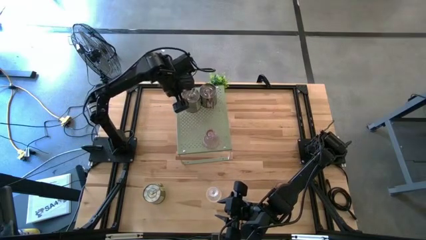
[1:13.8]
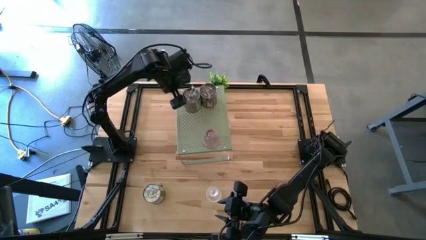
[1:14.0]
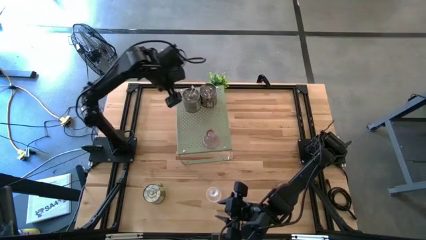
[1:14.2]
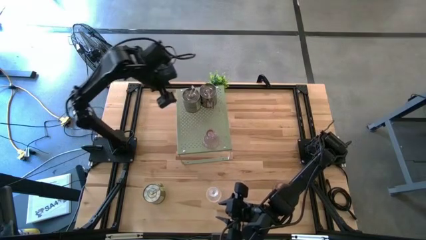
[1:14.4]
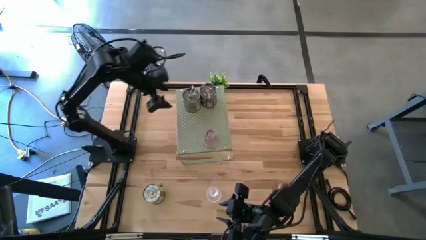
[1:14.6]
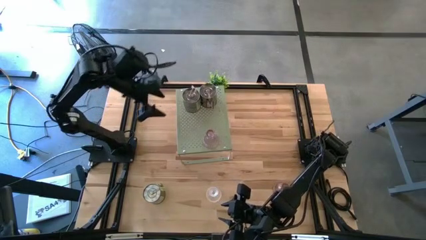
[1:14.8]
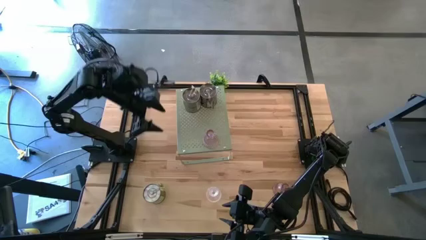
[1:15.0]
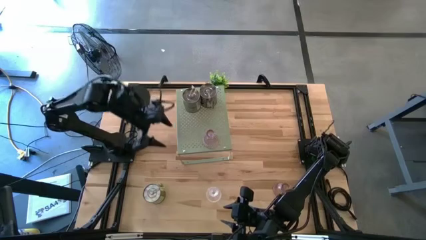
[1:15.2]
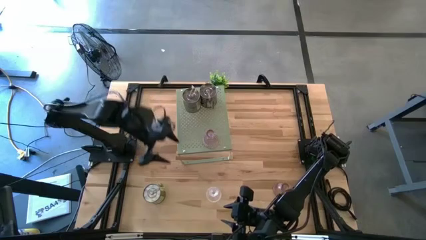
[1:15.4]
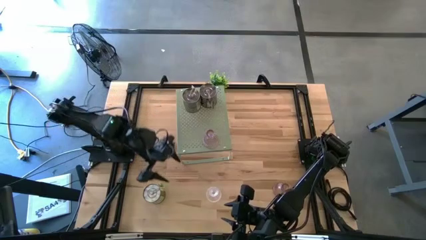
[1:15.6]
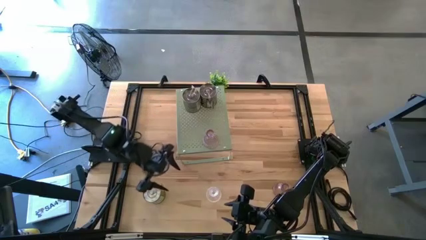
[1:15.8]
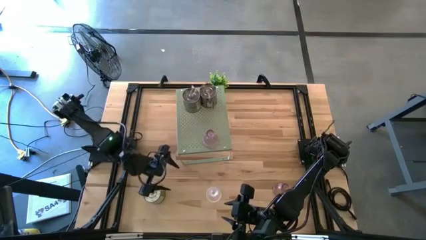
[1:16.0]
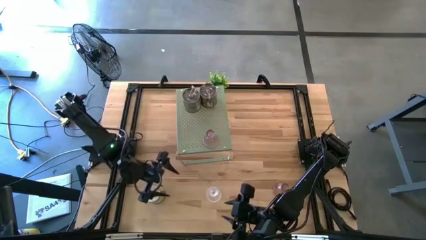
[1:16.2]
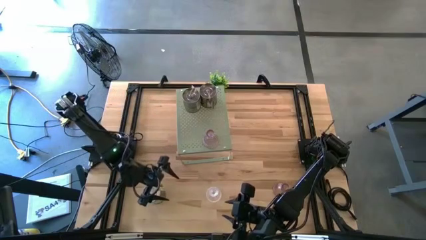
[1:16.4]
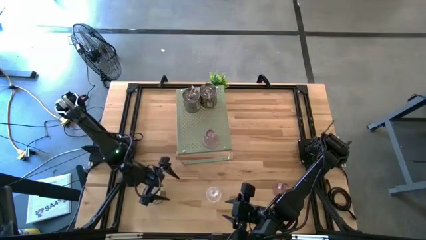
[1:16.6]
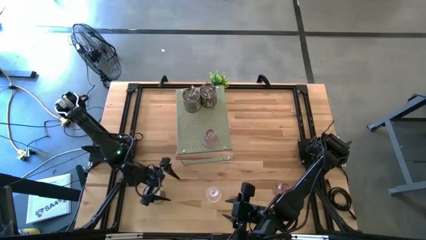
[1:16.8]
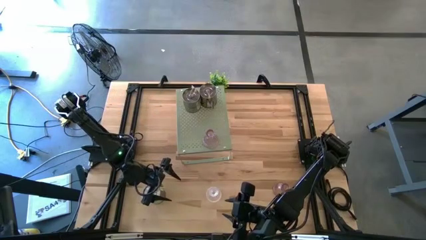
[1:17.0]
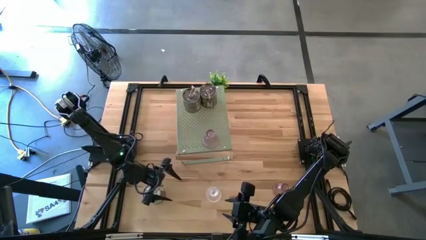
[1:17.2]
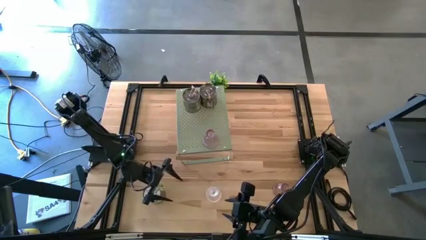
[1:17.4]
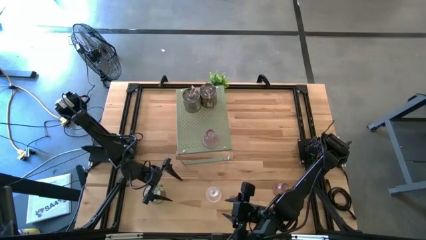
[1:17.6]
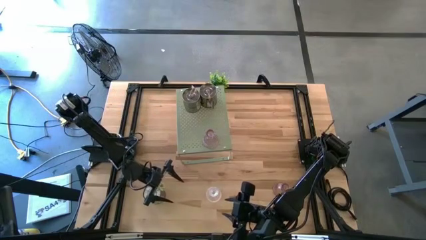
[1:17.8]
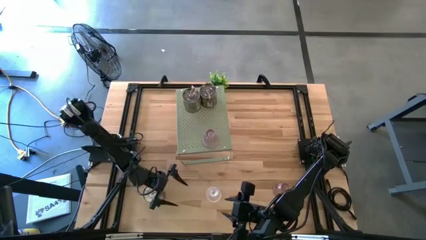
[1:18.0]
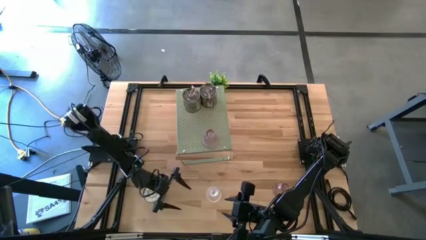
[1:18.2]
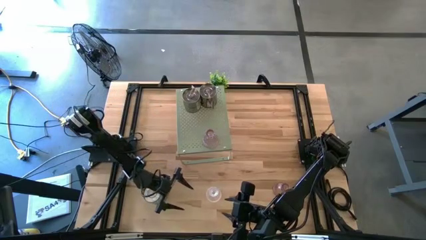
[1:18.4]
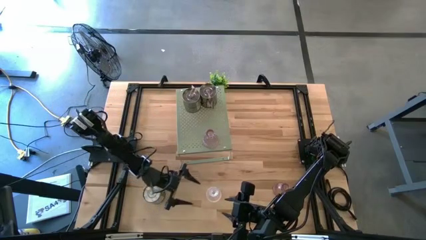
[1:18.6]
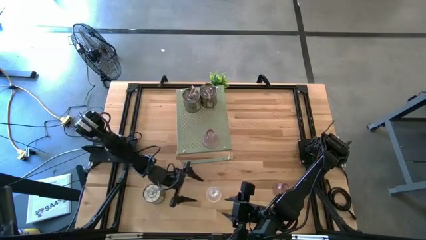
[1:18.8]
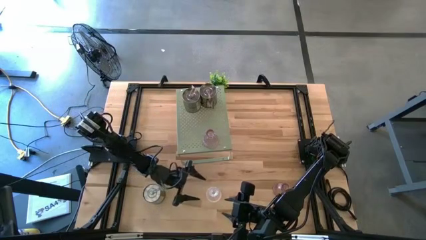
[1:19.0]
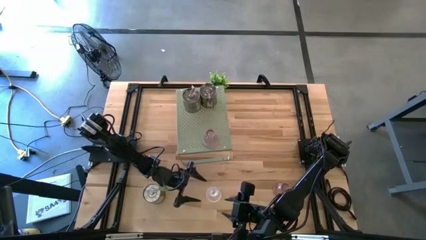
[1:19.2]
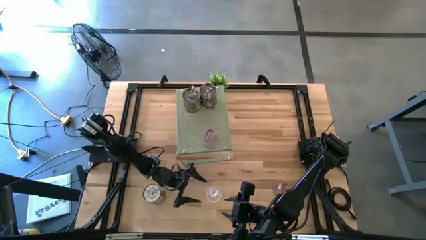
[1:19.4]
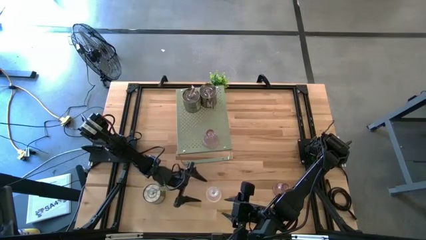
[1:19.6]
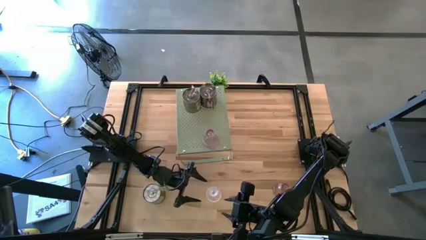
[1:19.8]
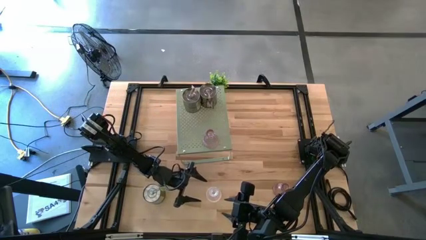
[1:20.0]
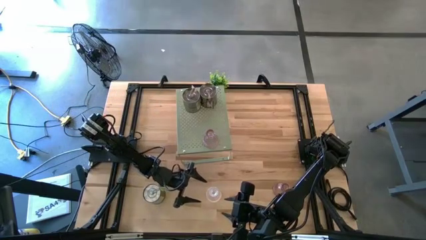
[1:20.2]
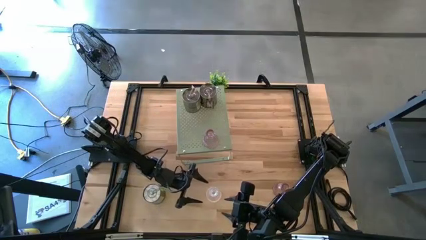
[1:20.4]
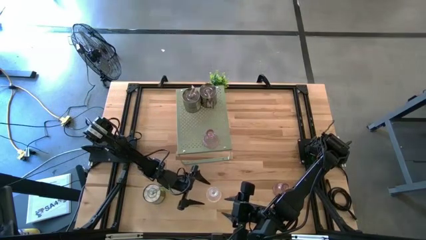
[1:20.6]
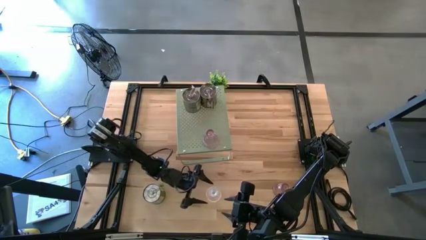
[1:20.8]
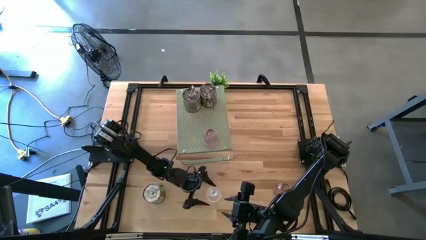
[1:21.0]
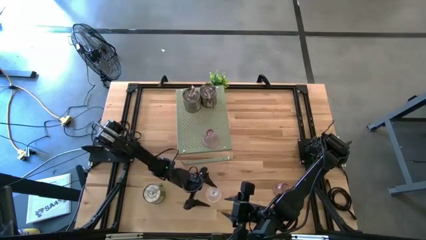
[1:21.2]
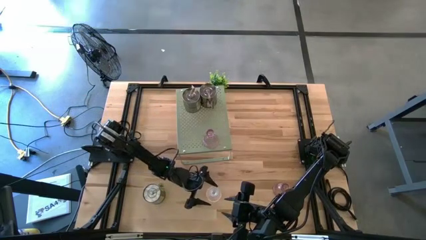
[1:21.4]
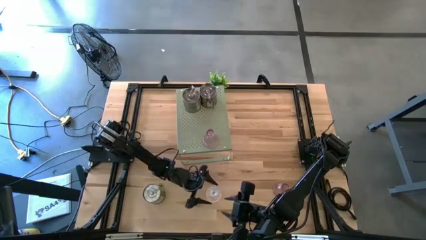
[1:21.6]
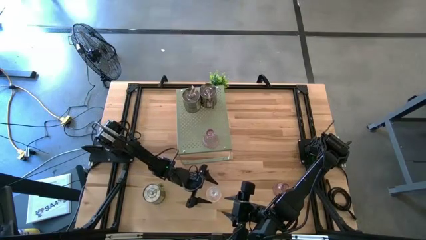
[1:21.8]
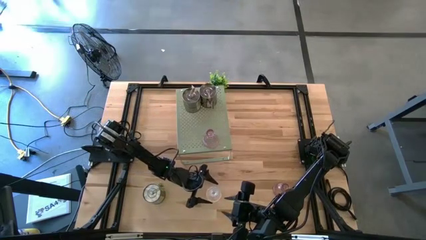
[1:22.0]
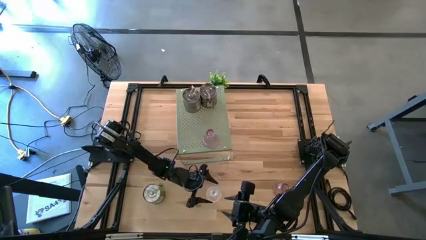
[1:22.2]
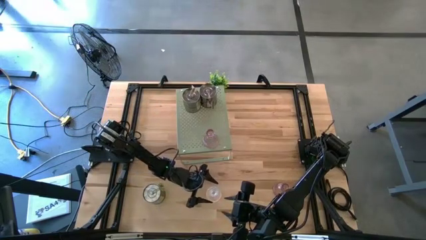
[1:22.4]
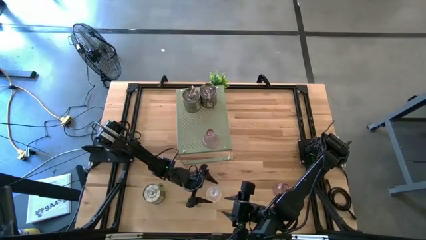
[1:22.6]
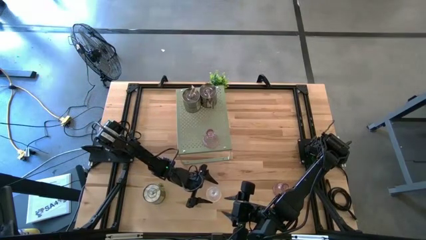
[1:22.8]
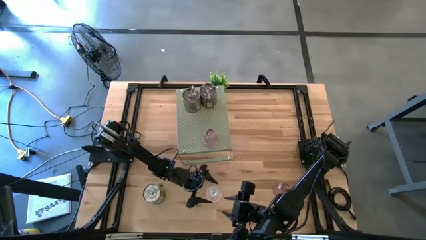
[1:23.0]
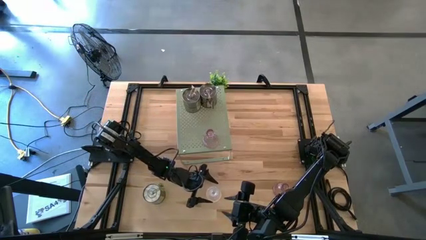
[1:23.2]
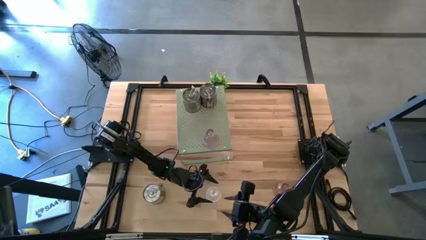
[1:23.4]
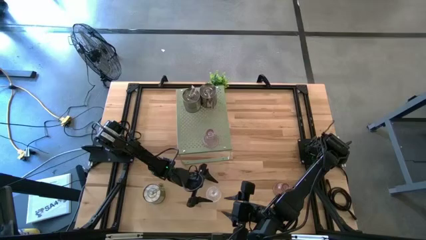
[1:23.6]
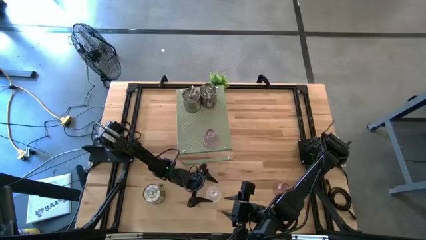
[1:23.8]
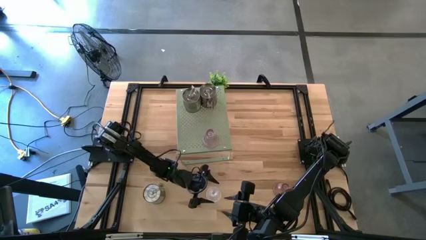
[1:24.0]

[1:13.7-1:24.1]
Task: Pick & Place candle stick holders
Put the transparent candle holder on the shelf

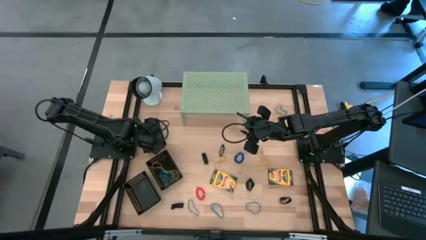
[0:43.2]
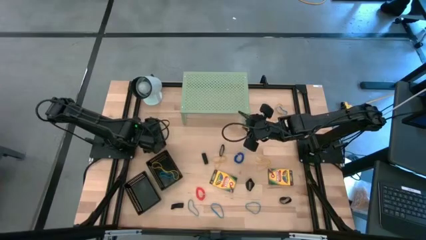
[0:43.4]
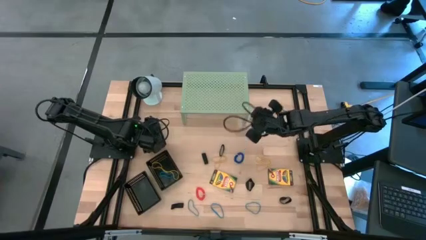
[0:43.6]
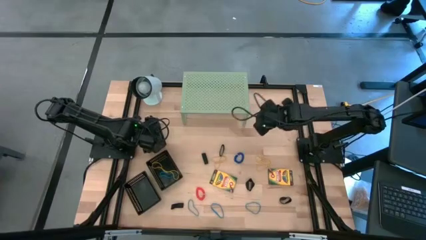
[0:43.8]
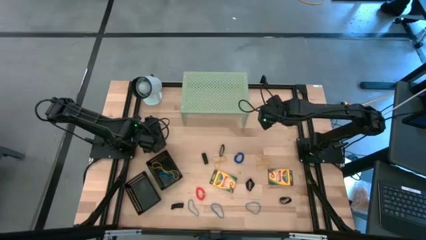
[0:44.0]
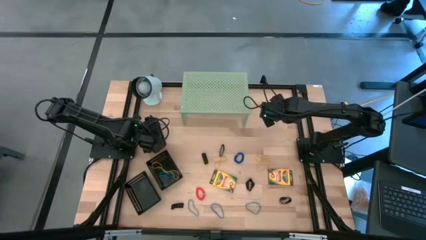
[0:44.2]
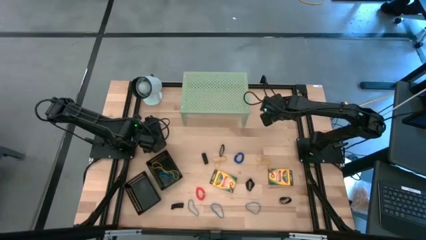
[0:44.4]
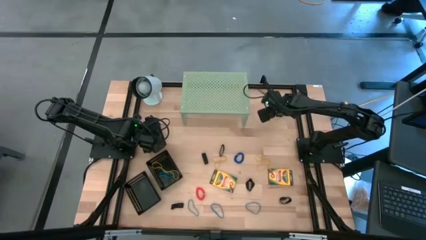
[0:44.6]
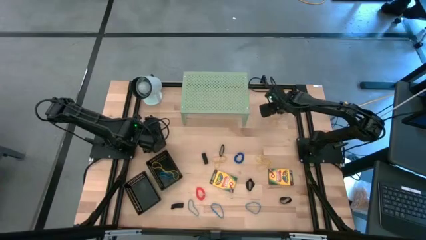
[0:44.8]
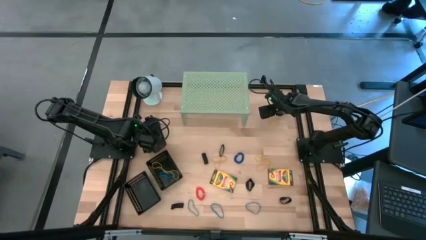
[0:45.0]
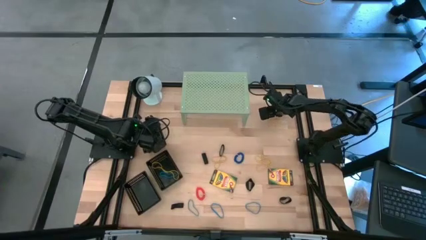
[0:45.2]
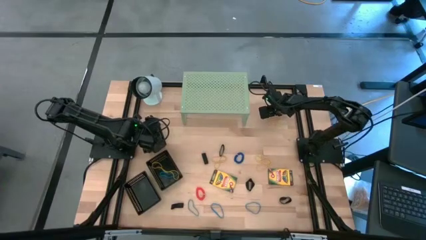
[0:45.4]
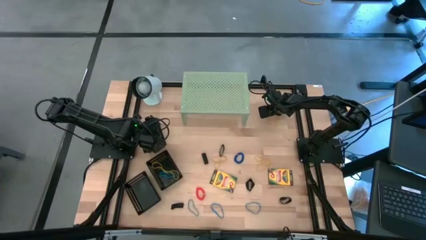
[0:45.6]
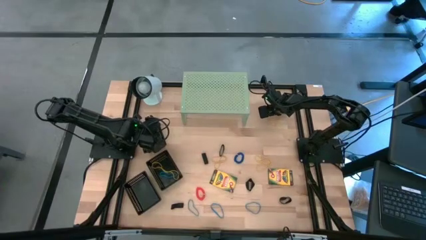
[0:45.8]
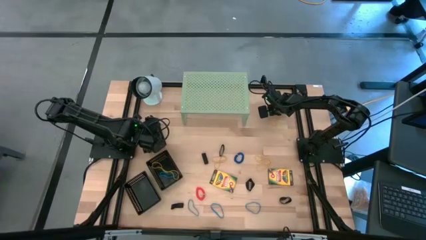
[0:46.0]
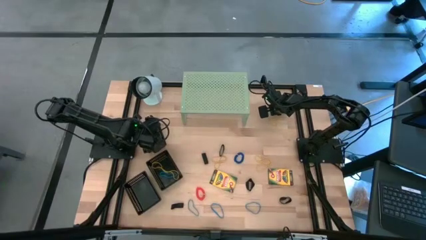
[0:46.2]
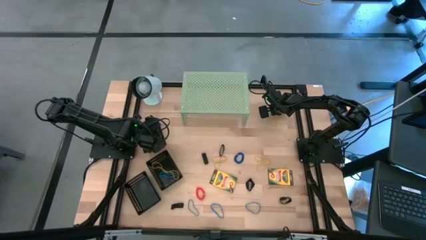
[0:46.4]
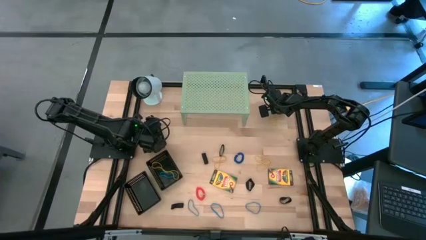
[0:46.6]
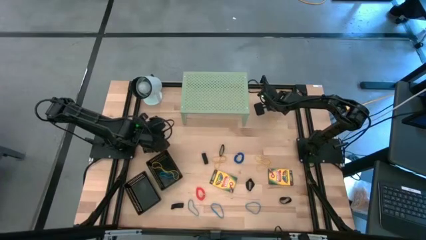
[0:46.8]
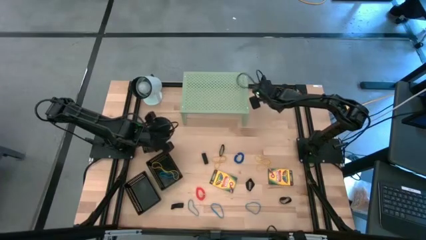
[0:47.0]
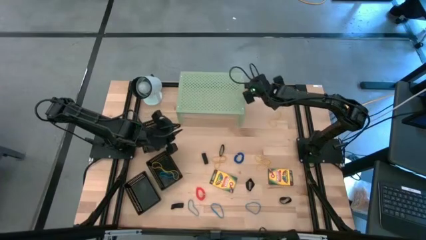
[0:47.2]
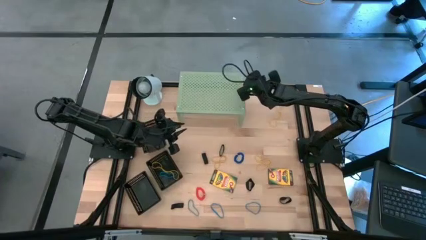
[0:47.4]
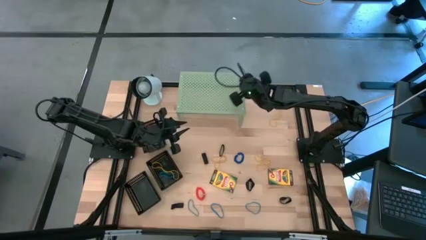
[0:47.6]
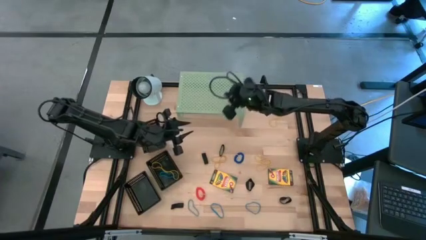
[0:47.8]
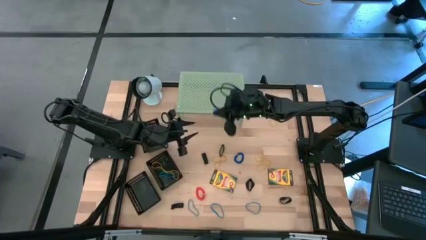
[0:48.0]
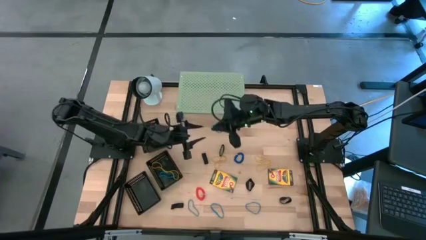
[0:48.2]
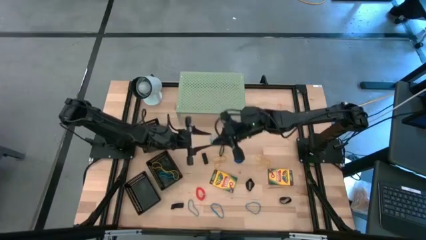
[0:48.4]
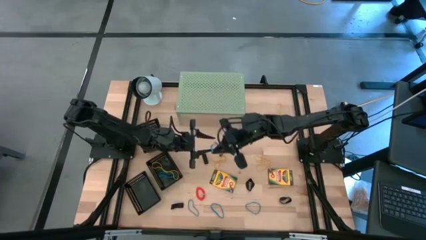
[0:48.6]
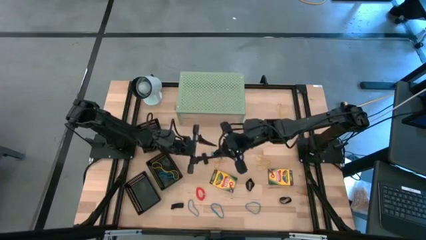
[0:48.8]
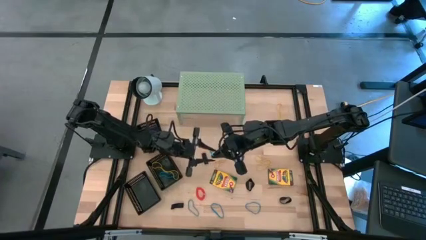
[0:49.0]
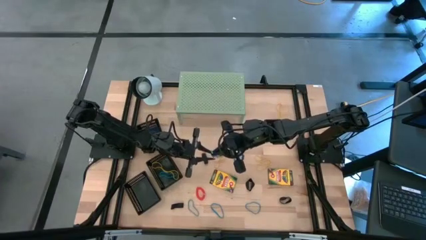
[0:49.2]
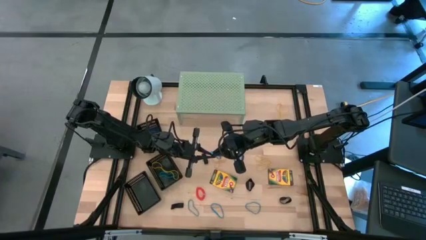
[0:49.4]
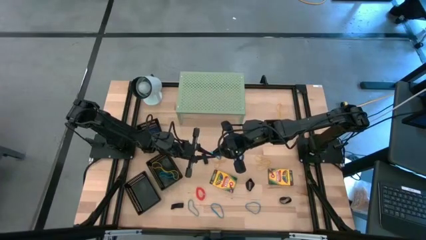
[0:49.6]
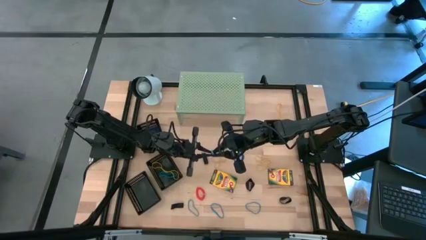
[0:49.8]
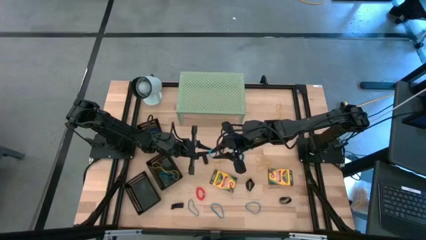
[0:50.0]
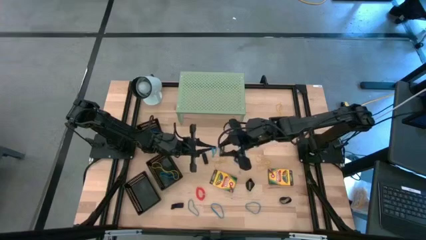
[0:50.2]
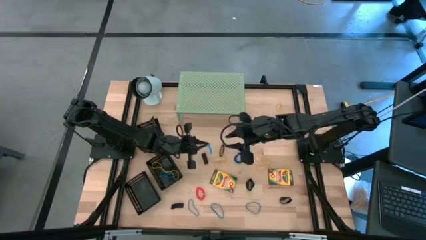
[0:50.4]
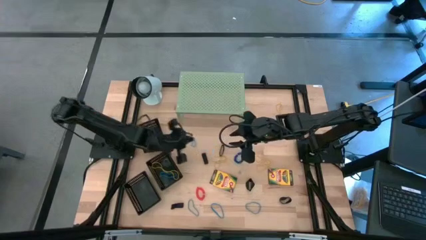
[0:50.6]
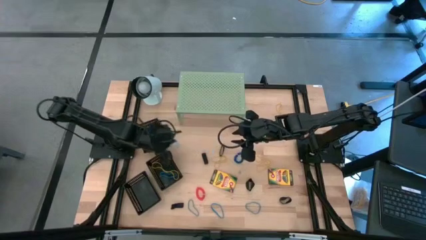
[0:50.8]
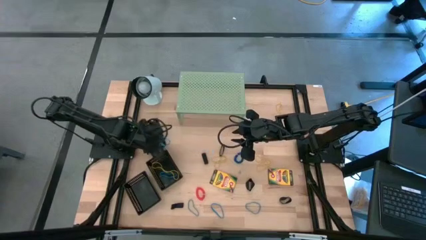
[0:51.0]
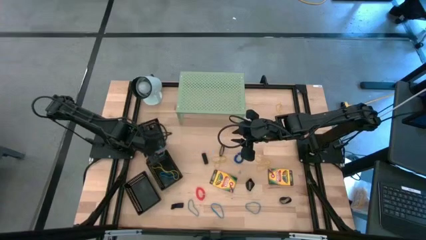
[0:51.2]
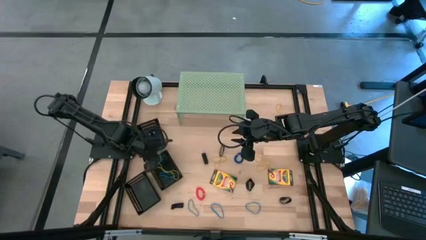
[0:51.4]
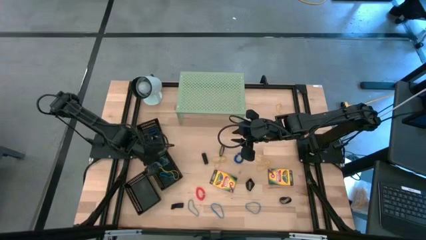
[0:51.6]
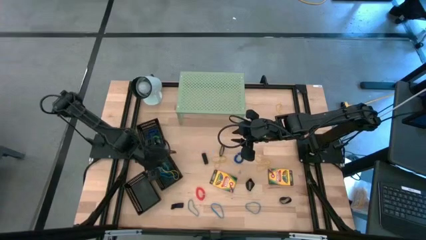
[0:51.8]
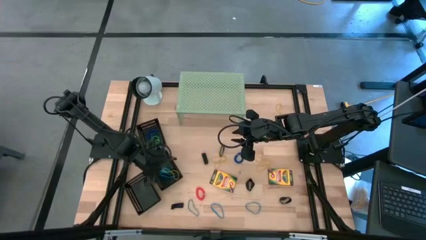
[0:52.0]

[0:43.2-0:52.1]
Task: Pick & Place Office Desk Supplies
Put the blue rubber band into the middle black bin
